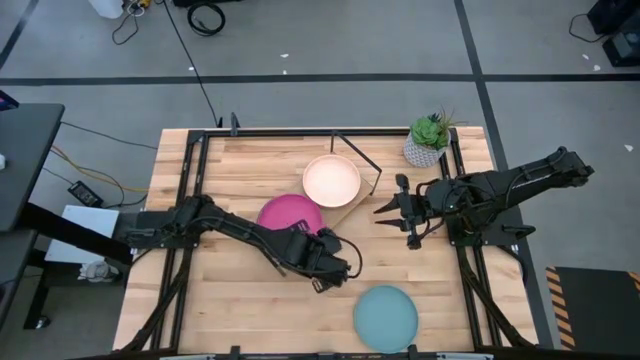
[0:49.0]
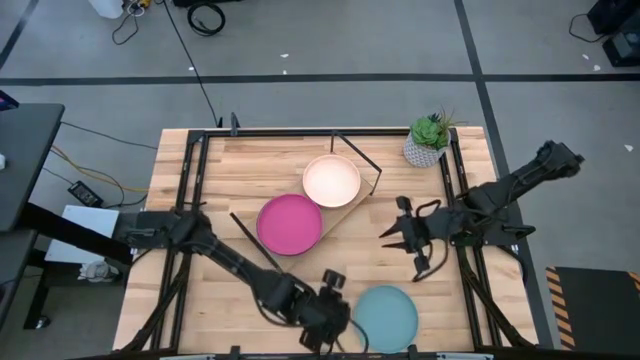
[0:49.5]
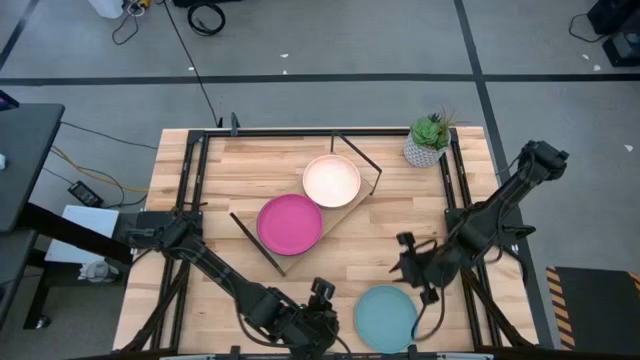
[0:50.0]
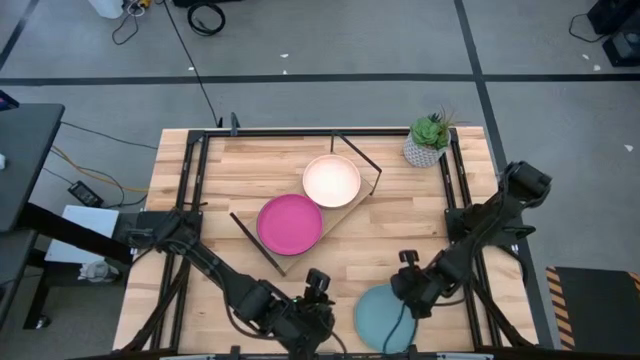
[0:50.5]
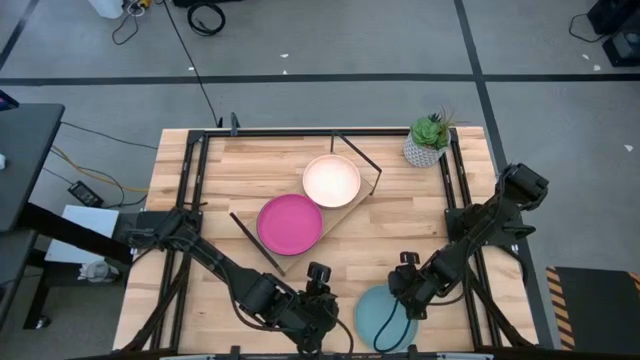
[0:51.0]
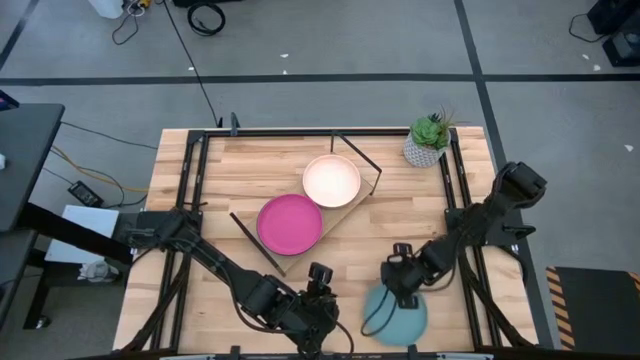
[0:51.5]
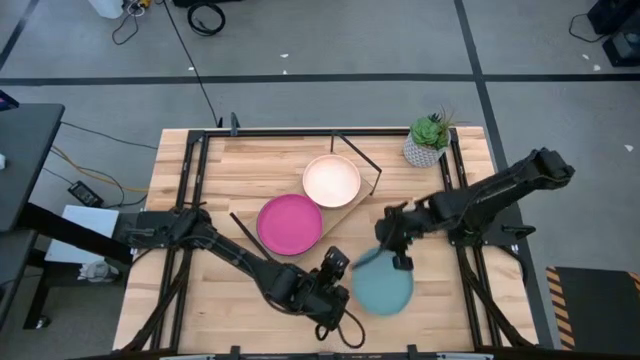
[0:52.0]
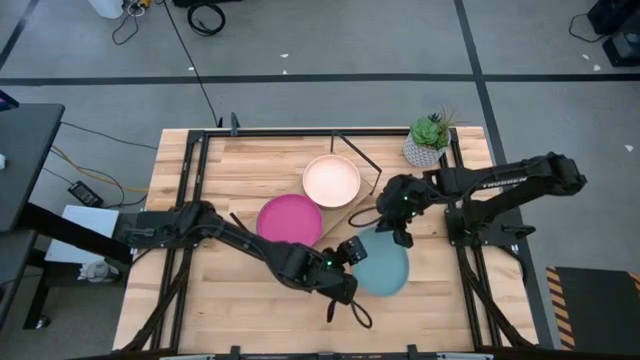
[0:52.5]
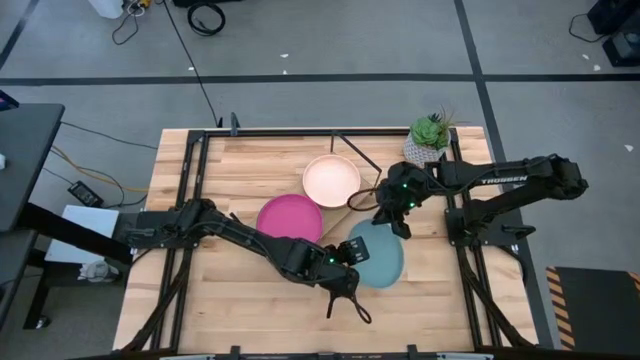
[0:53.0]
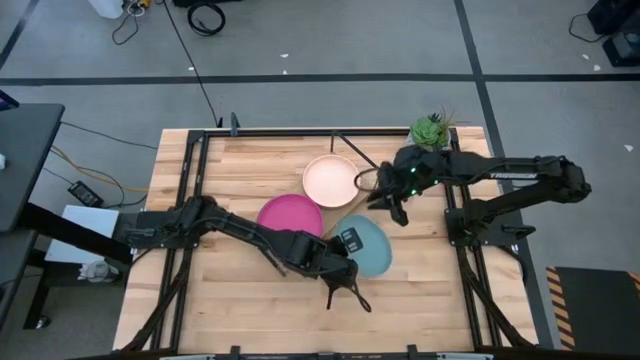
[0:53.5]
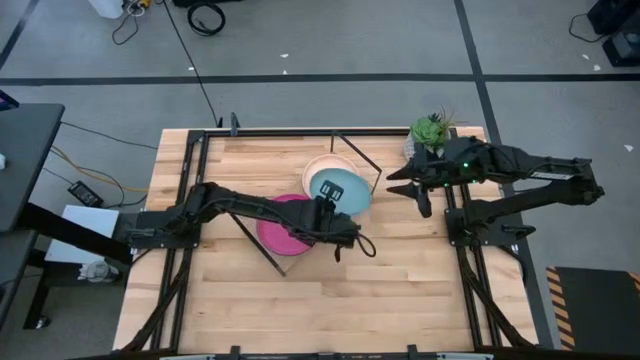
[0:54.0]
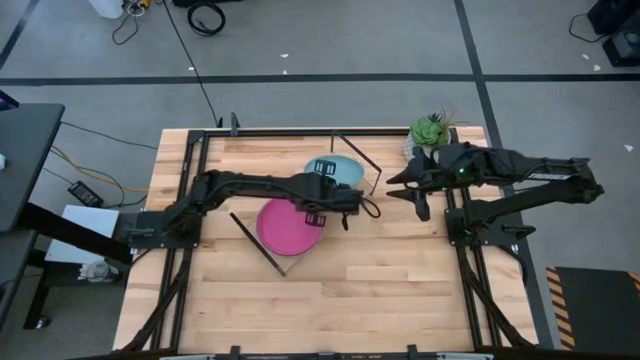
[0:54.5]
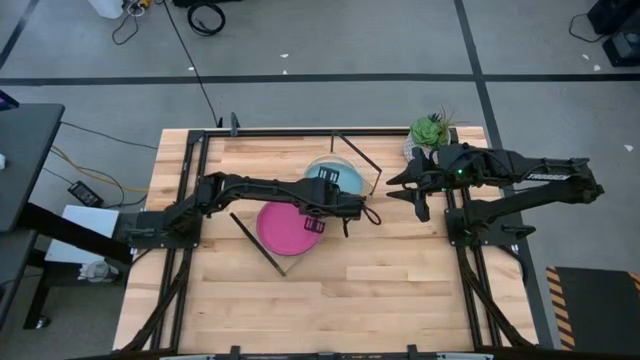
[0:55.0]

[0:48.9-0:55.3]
Task: Place and stack plates onto a shelf
Stack the light blue plate on top of the white plate on the shelf

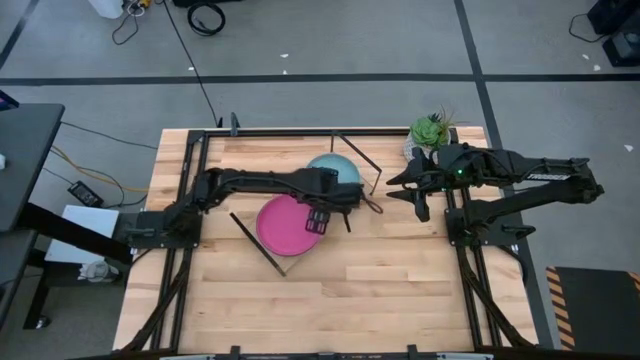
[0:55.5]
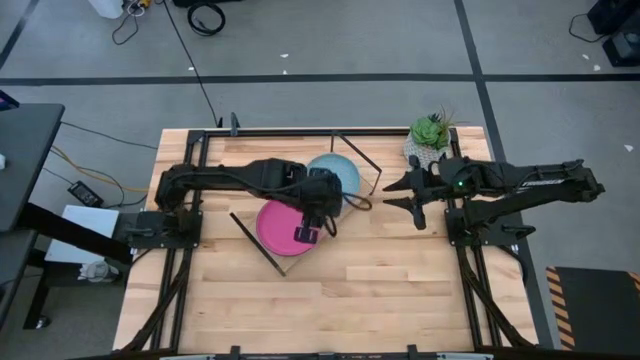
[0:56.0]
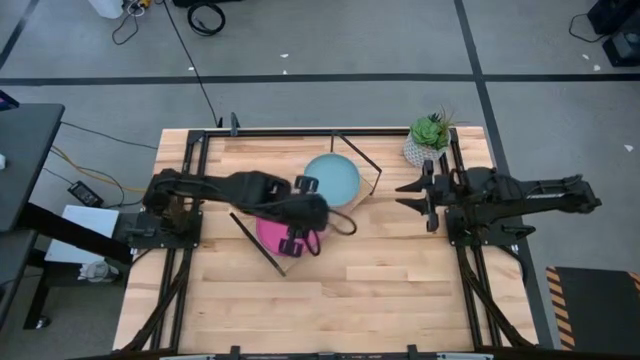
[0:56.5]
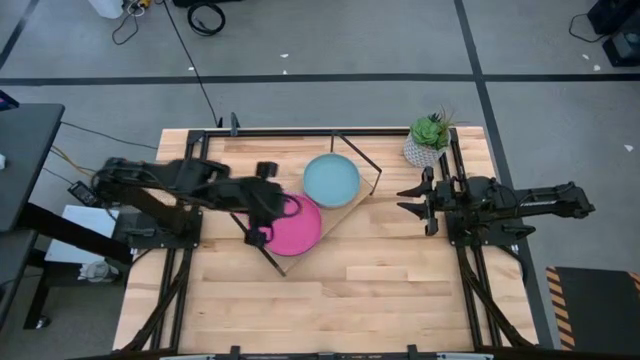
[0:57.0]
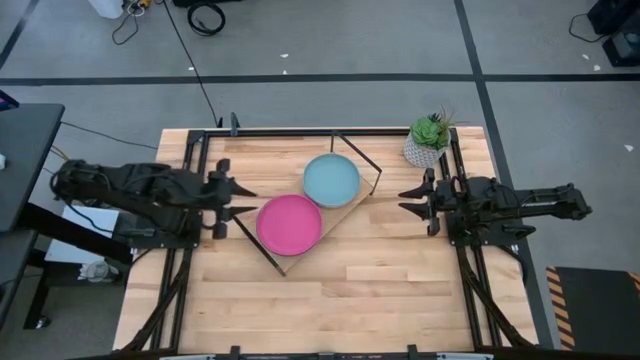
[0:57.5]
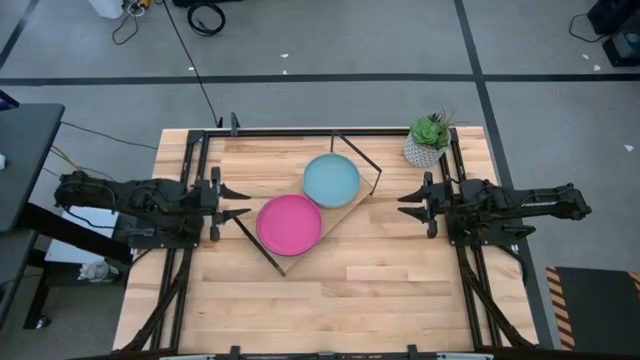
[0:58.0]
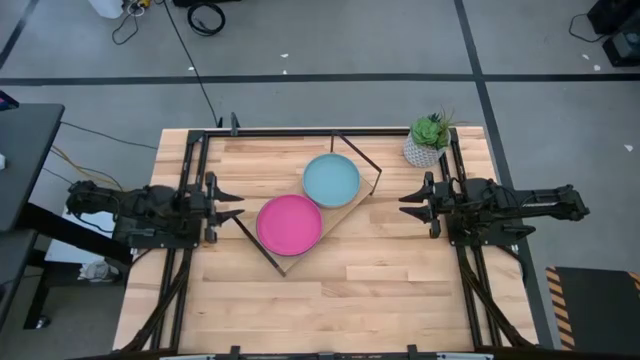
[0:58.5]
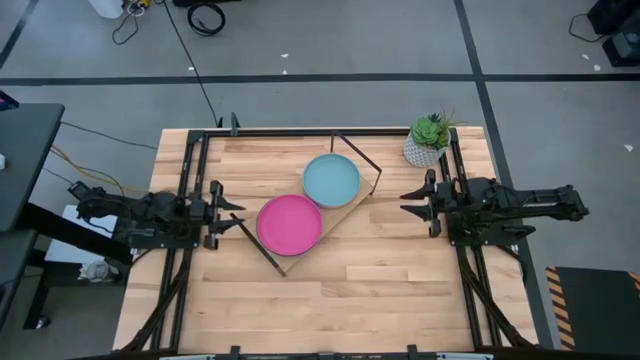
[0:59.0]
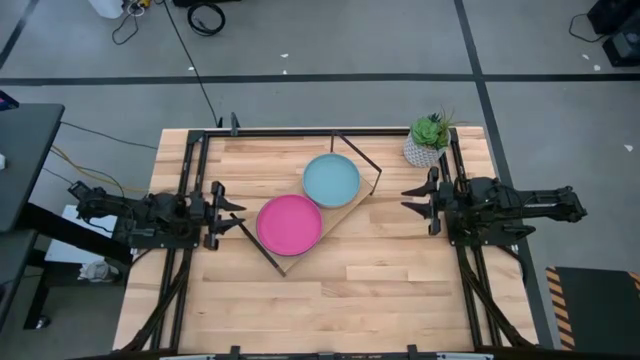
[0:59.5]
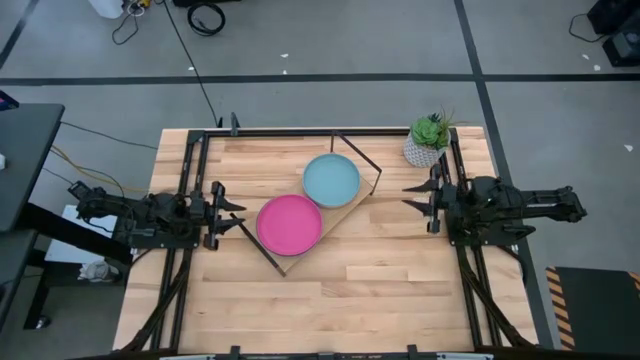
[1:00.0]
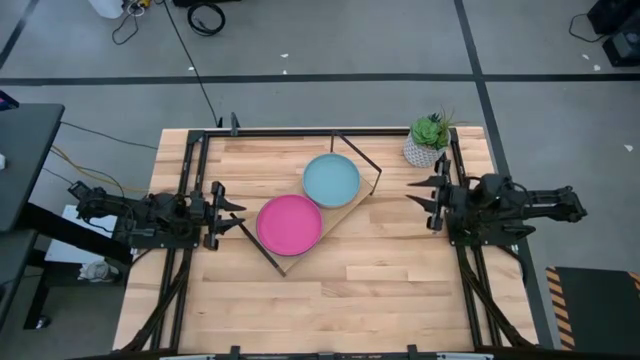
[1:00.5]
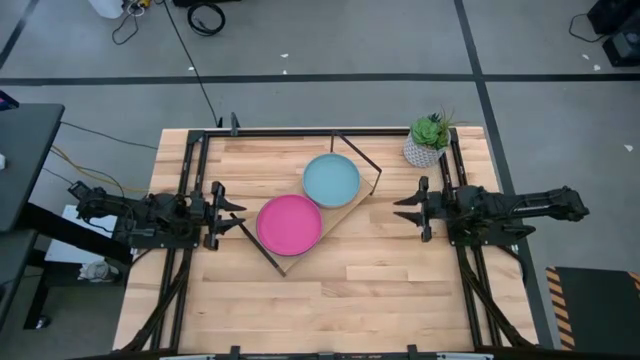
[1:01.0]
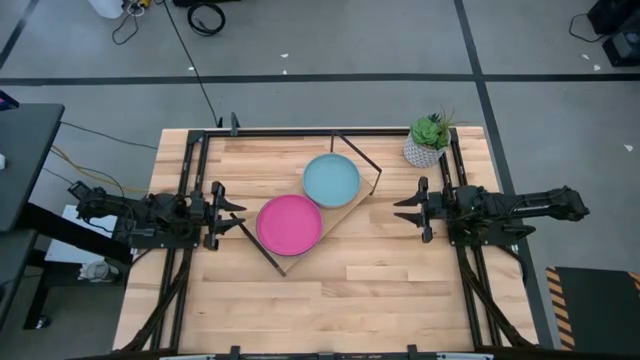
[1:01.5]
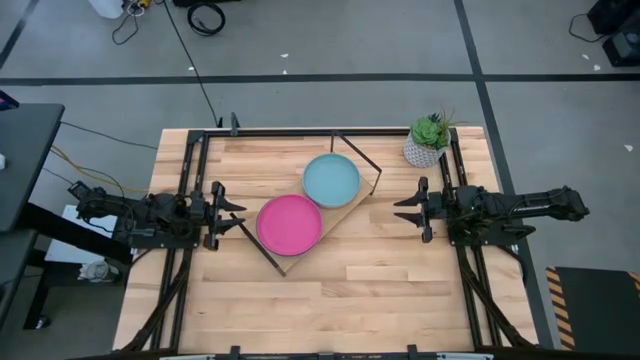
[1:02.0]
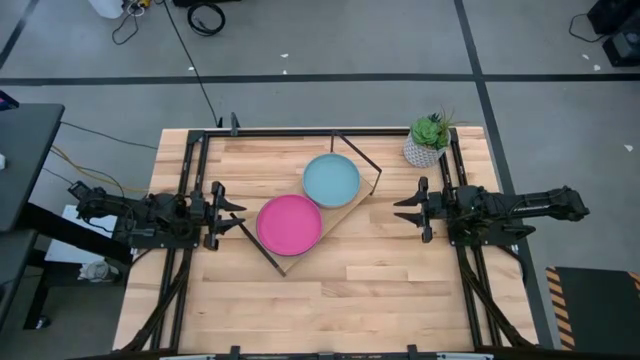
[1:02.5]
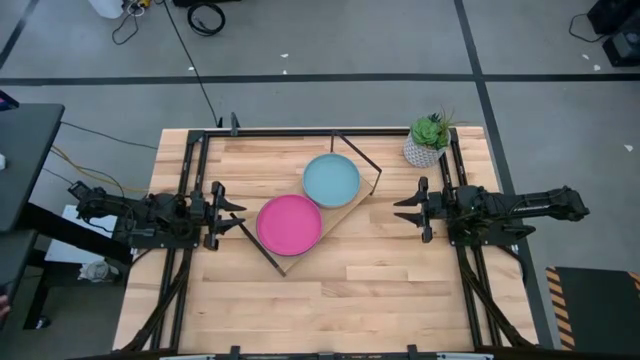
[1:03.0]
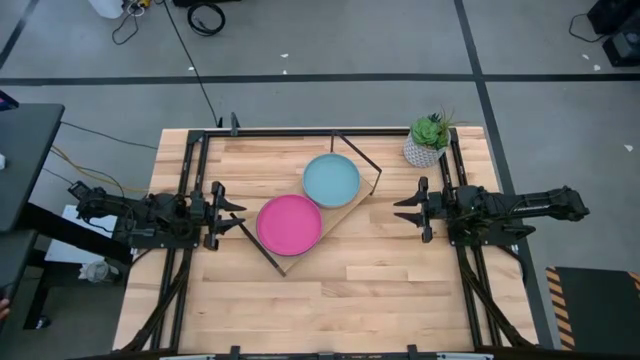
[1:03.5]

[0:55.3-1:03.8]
Return to Home Position

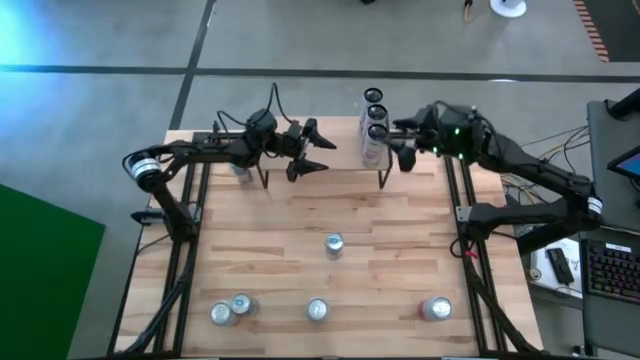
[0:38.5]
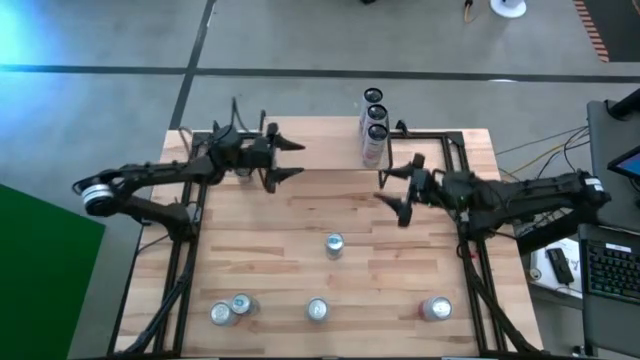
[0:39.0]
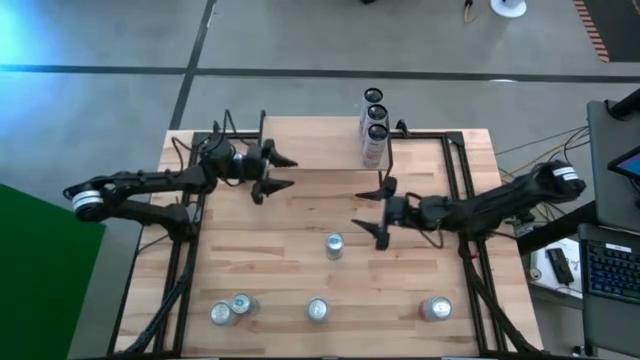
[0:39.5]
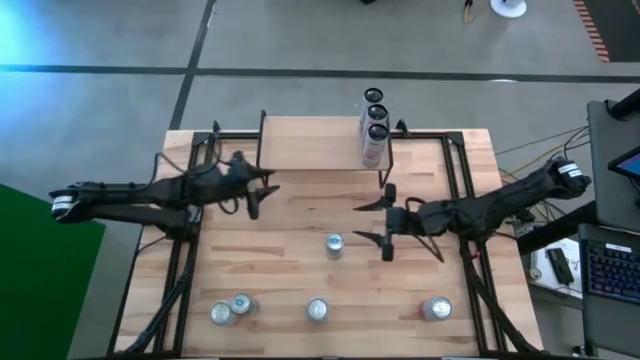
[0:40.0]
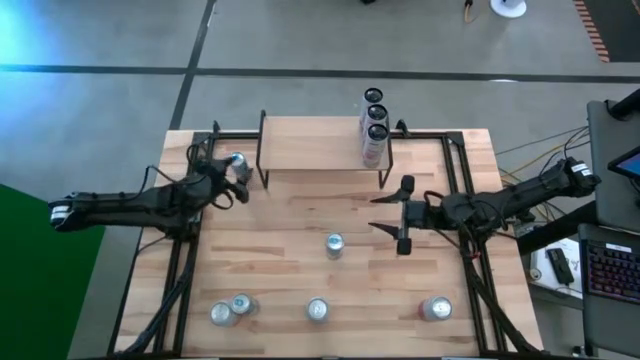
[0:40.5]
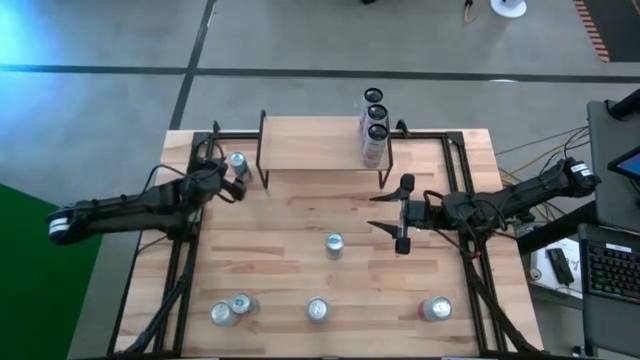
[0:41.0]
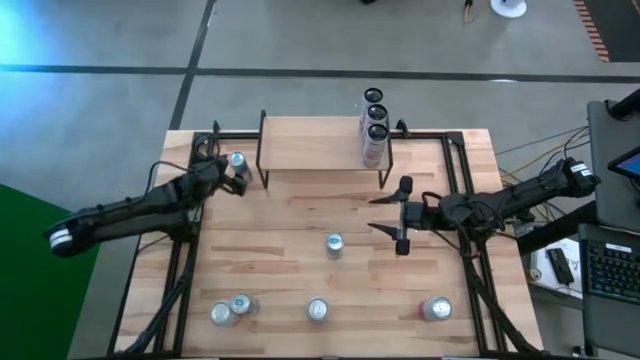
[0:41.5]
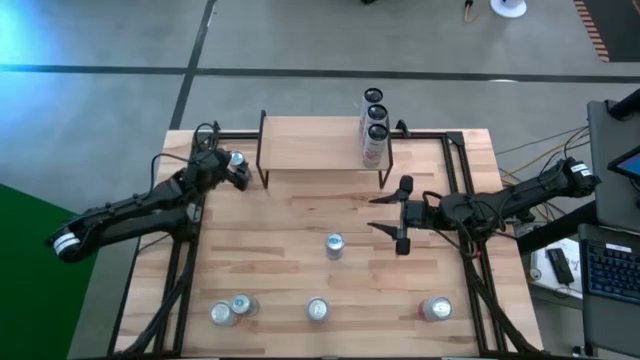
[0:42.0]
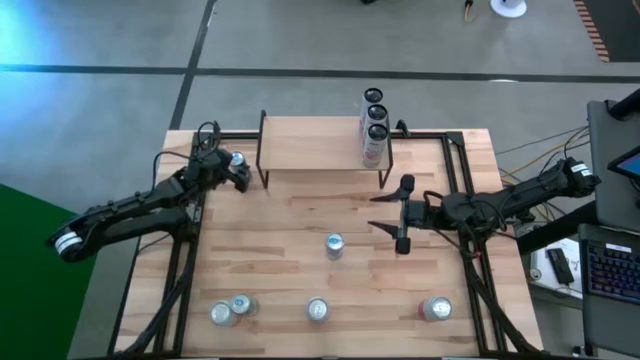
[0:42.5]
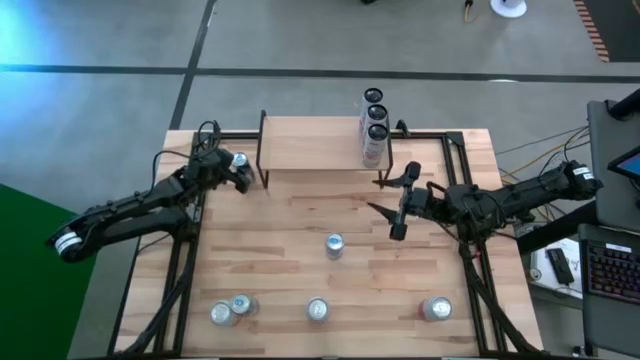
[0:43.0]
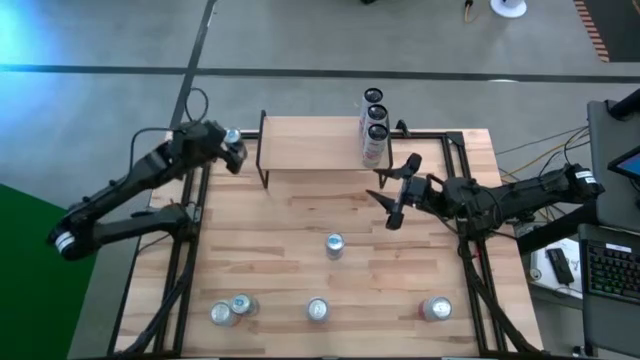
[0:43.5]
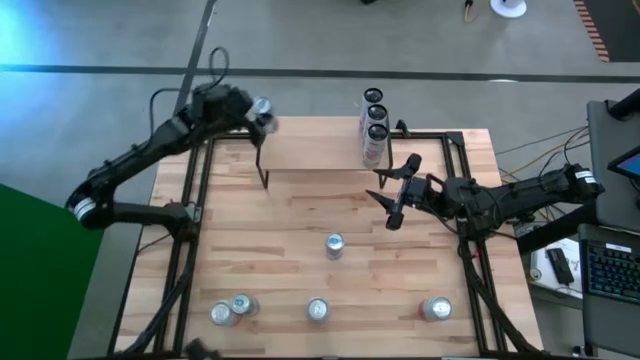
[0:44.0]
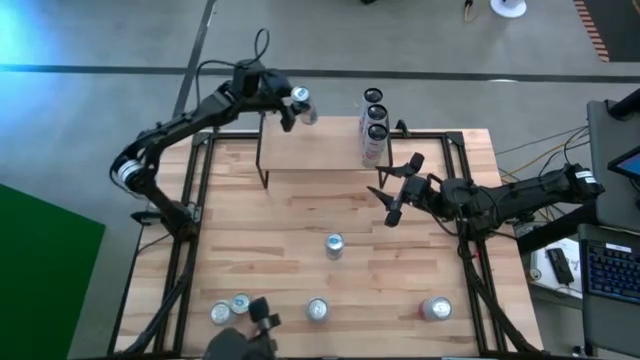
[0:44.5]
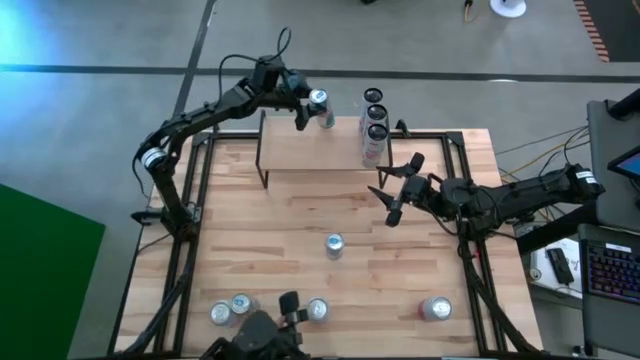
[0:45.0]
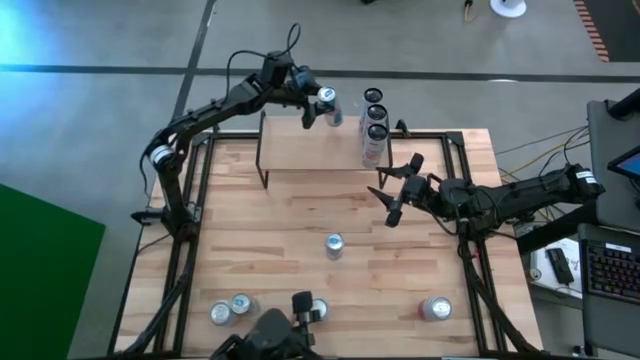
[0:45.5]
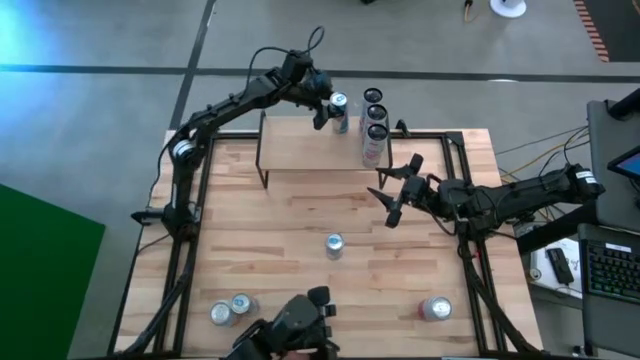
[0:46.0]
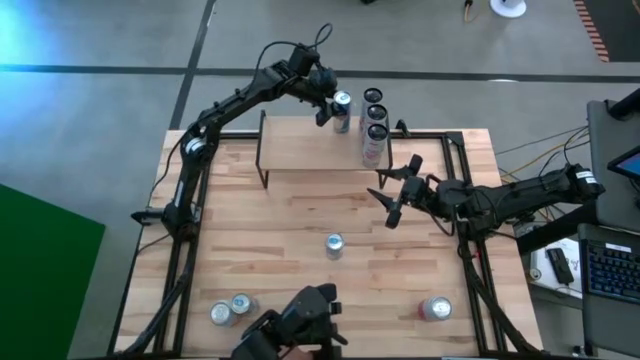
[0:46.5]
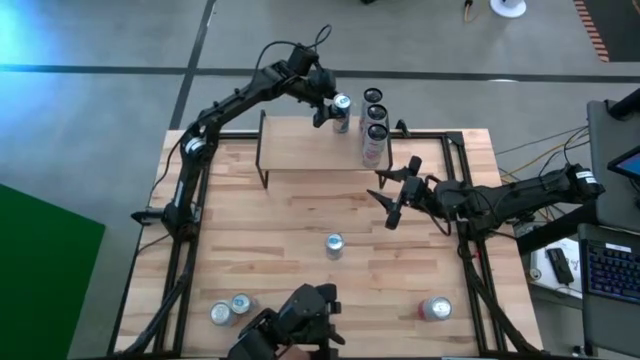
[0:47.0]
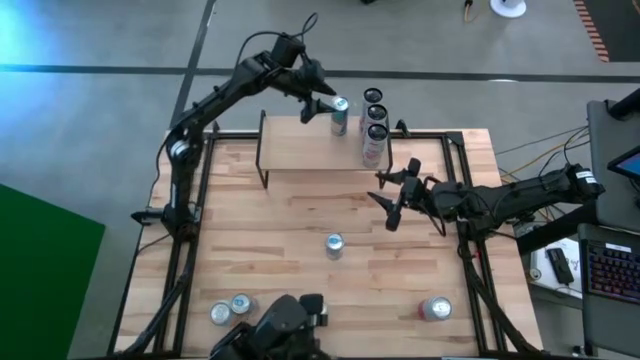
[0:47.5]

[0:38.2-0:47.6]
Task: Place canned beverage on shelf
Put the top blue and silver soda can on the shelf
